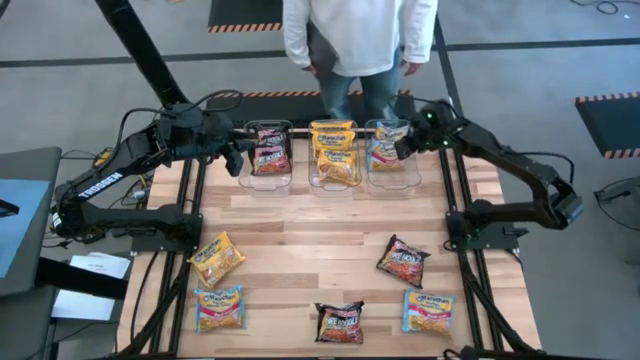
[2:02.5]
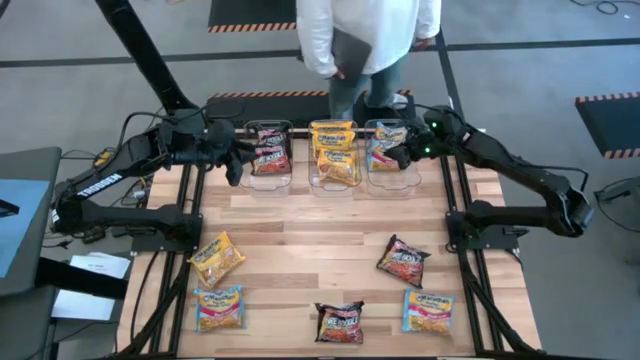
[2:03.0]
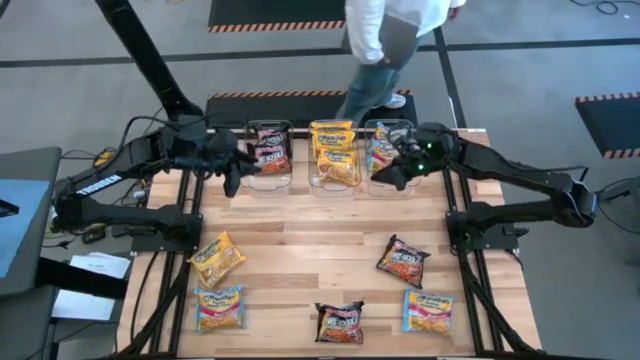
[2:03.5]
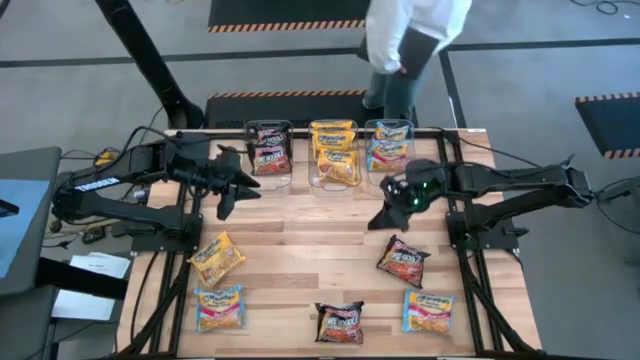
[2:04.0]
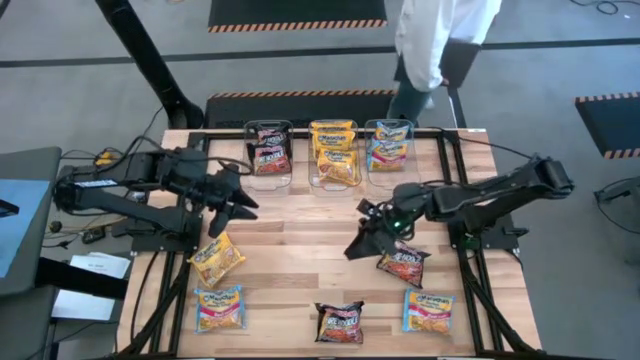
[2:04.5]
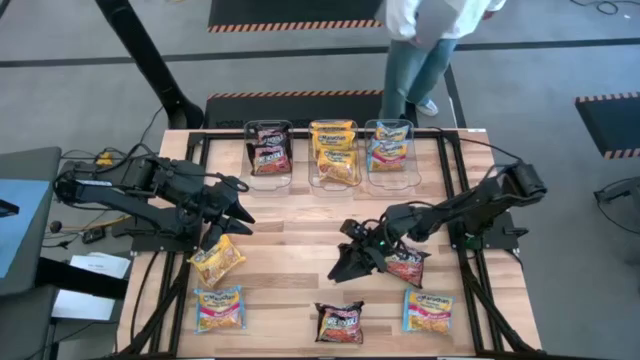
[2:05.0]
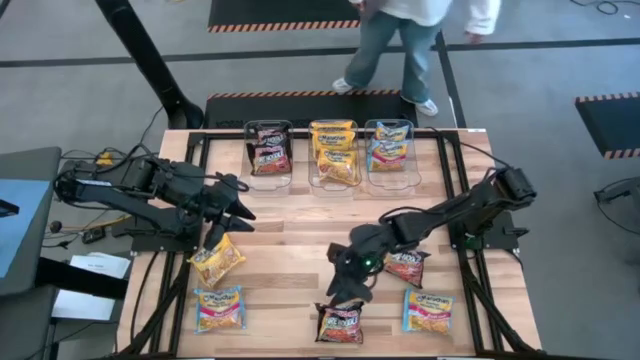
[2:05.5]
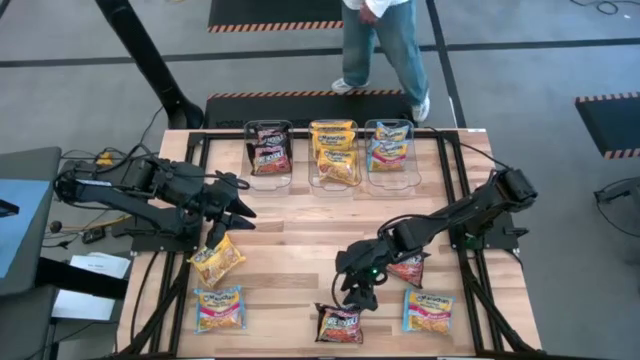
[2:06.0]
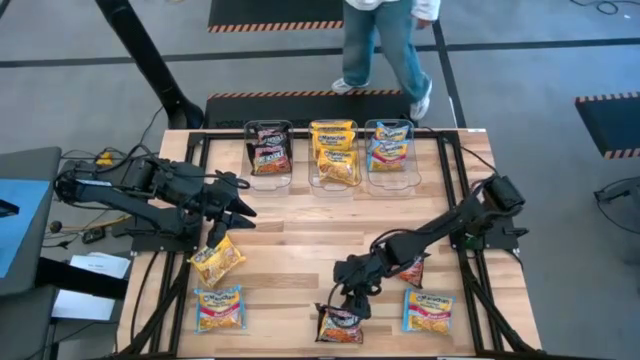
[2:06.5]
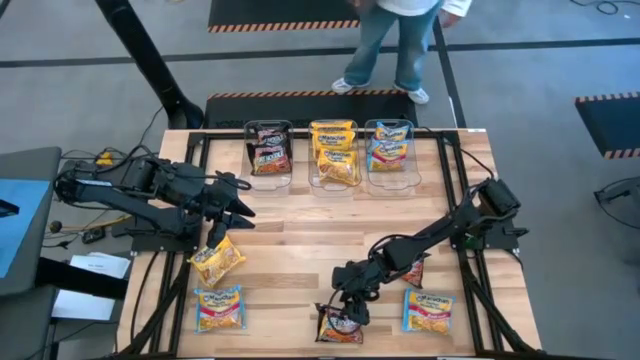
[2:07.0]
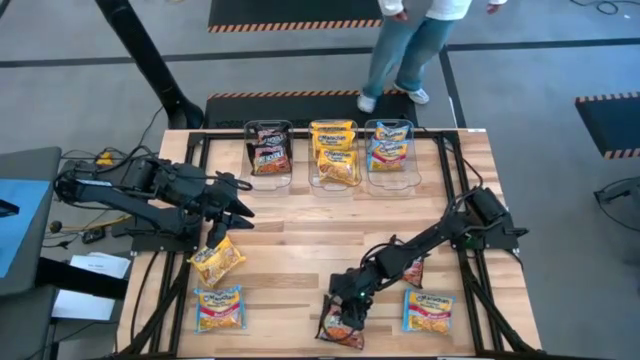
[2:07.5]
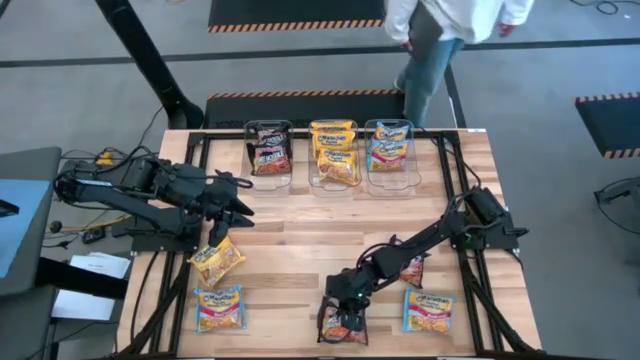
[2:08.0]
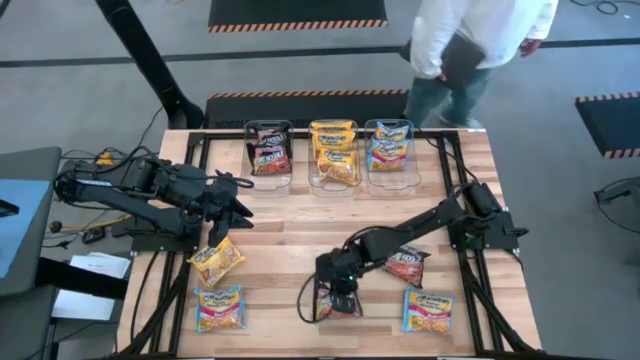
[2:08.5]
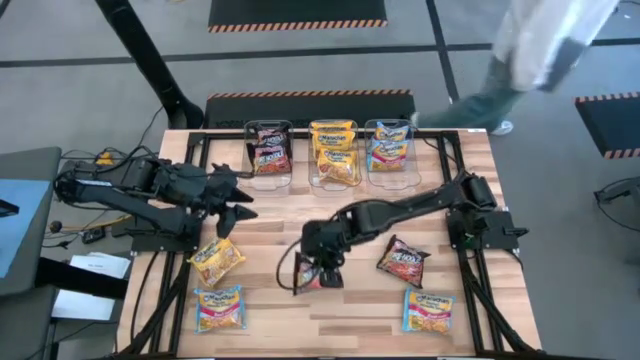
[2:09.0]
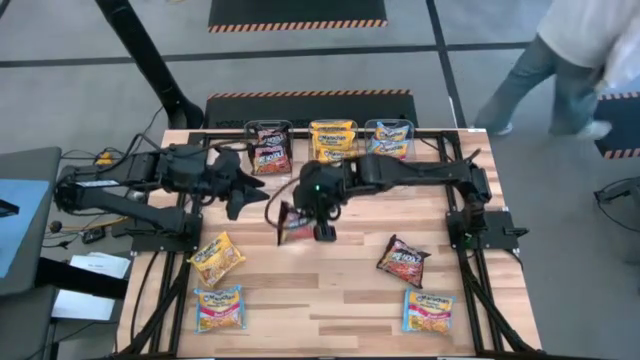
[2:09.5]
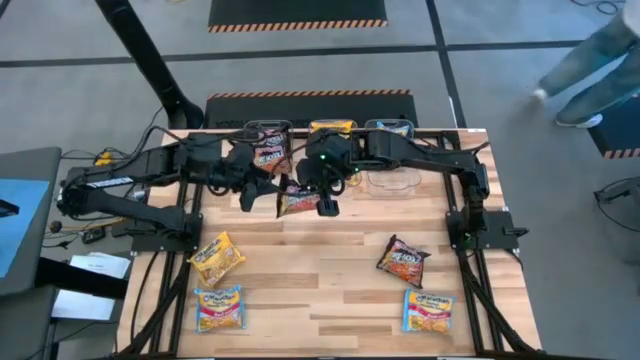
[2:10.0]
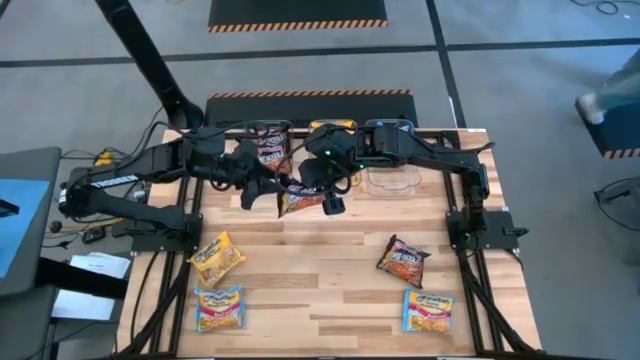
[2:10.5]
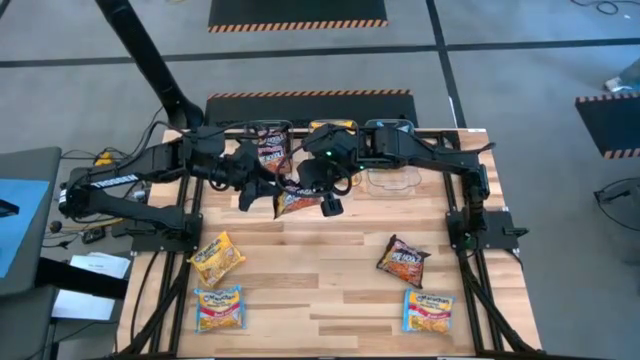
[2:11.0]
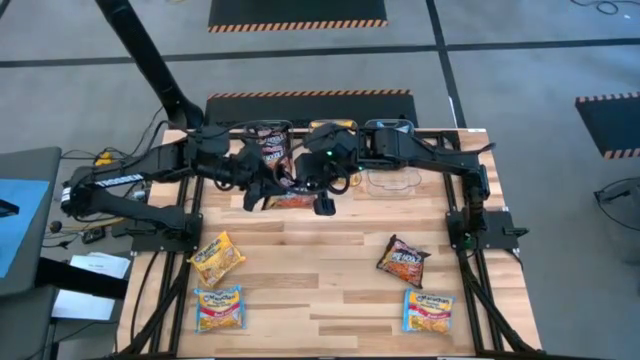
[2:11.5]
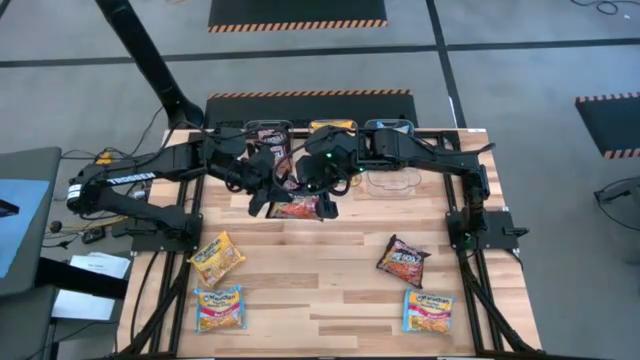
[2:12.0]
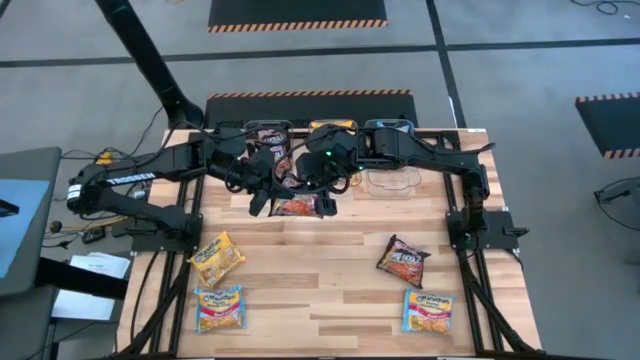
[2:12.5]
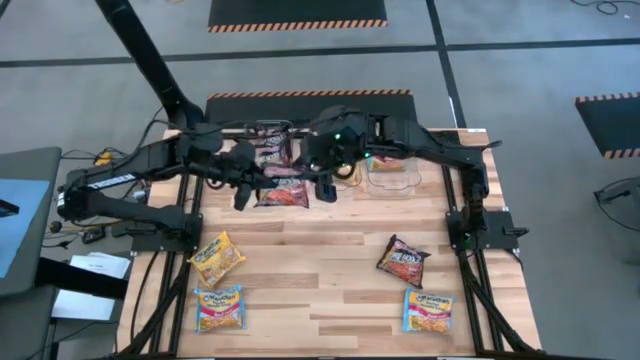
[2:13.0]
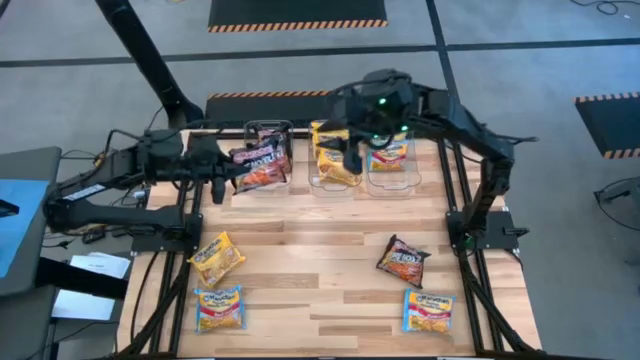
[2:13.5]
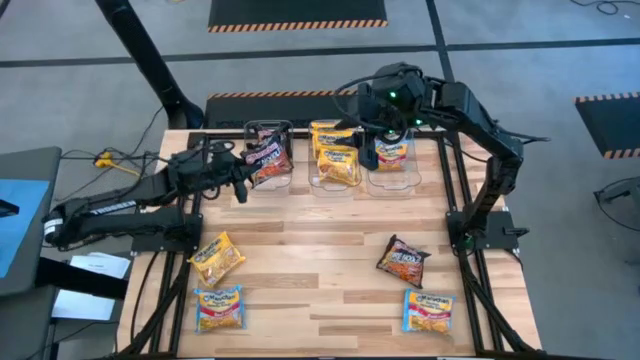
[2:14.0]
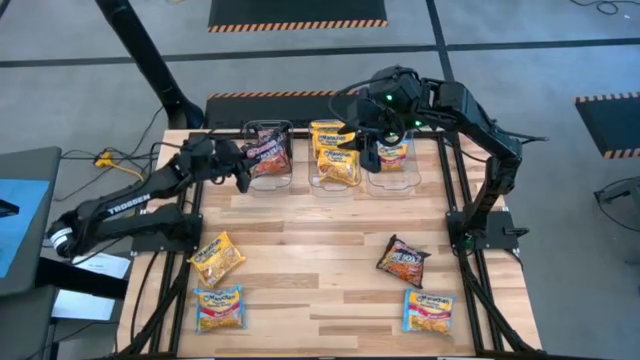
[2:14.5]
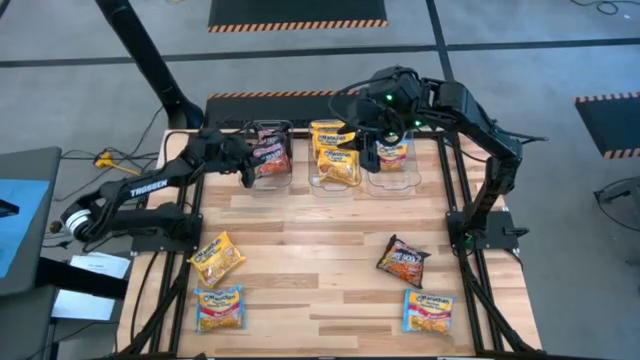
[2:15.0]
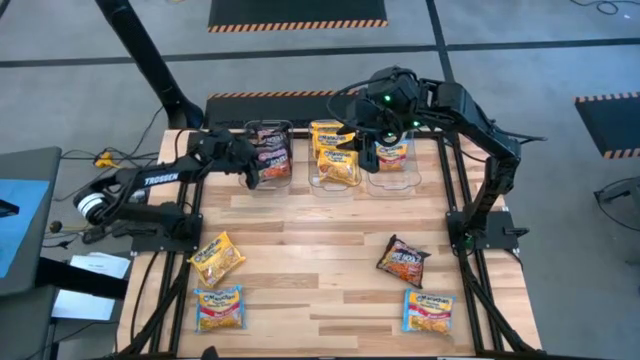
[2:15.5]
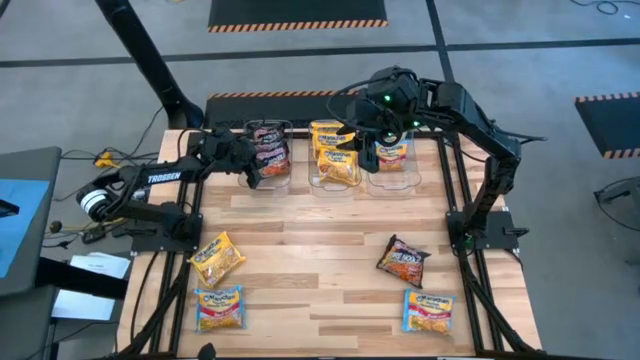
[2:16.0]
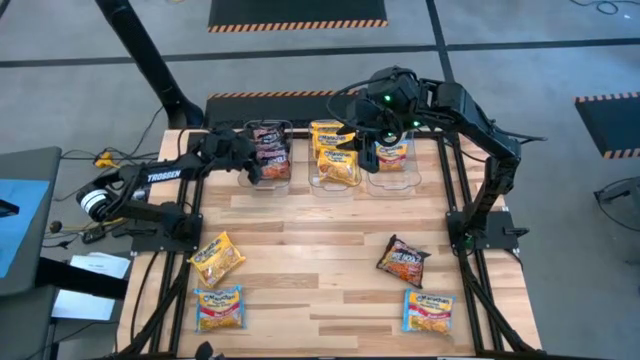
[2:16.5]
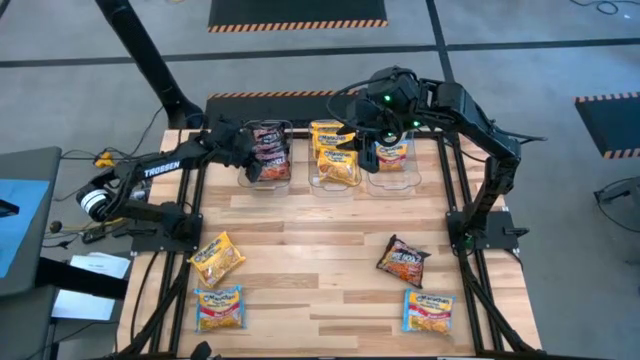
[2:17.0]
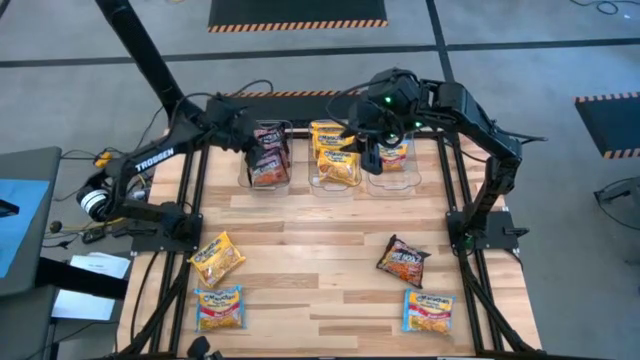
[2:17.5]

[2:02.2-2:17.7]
Task: Sort Maruchan noodles
Put the black noodle pack into the left transparent bin

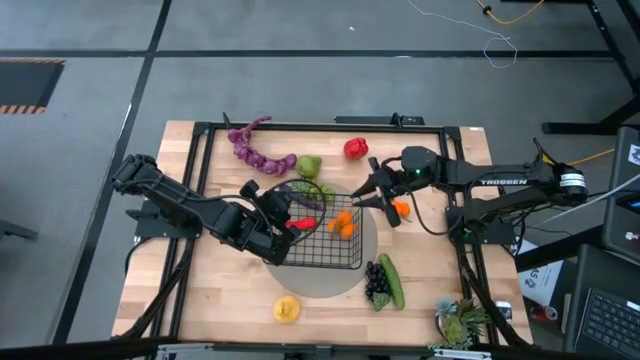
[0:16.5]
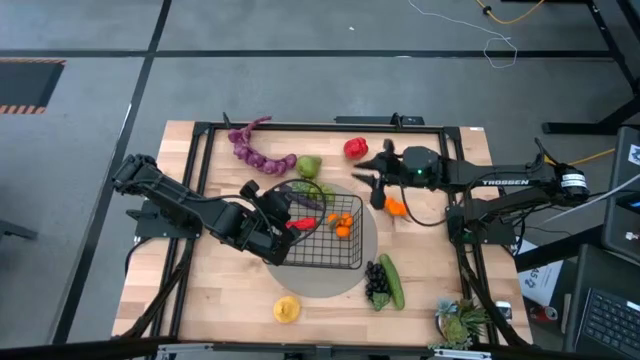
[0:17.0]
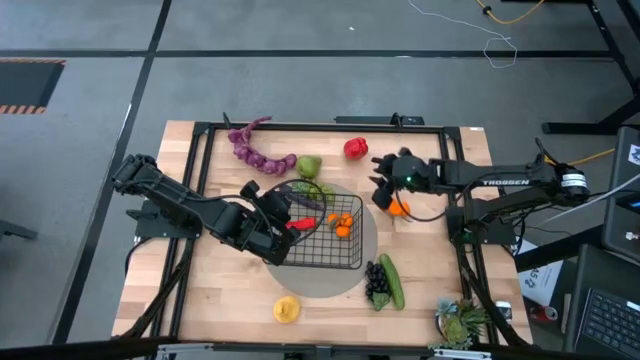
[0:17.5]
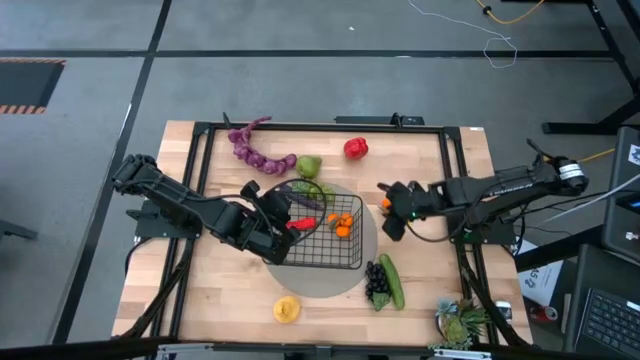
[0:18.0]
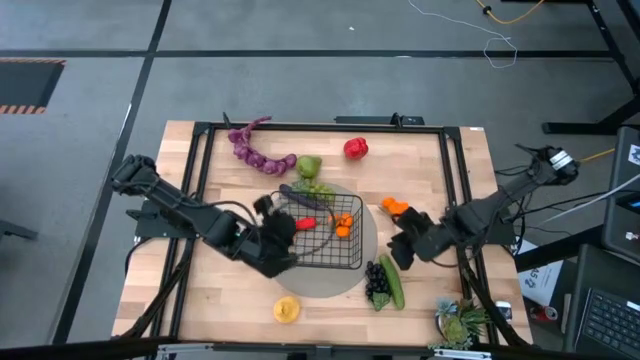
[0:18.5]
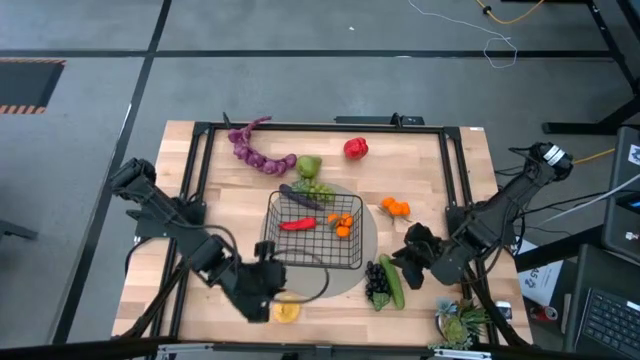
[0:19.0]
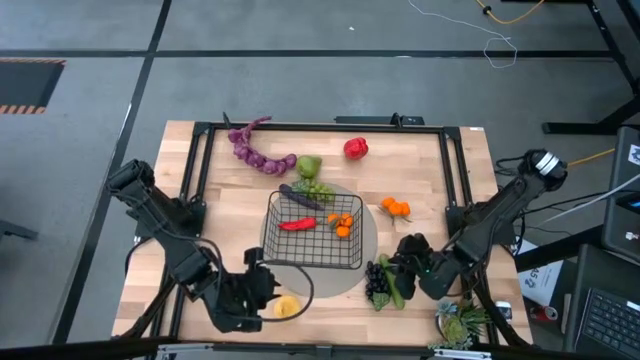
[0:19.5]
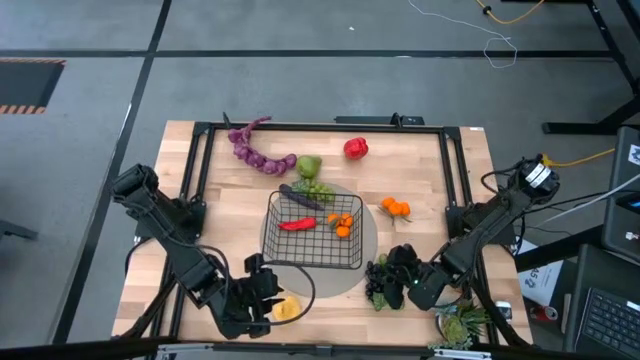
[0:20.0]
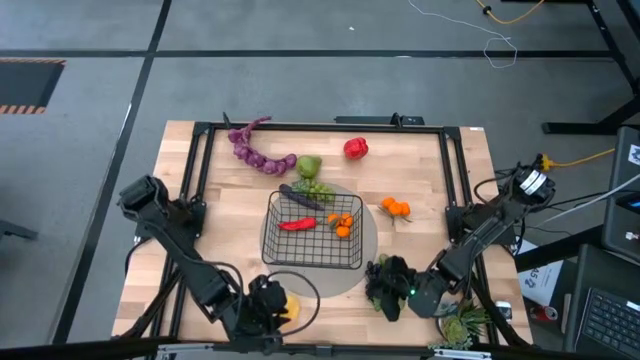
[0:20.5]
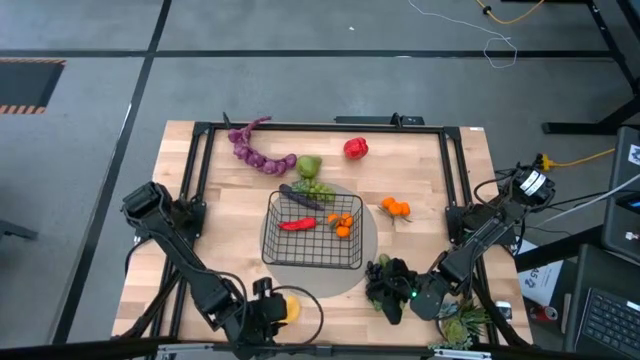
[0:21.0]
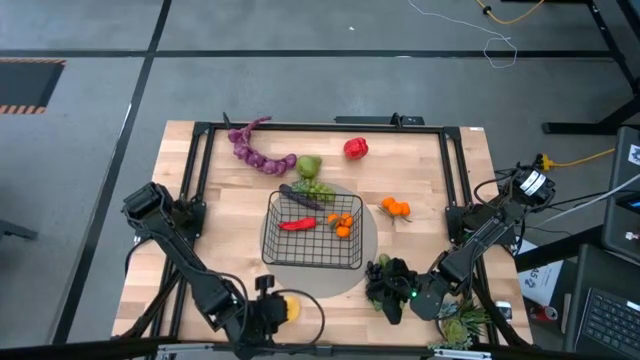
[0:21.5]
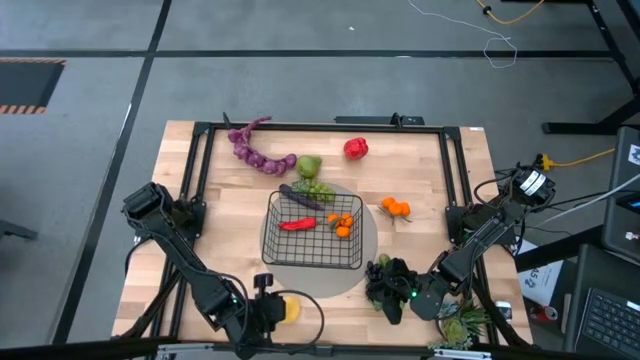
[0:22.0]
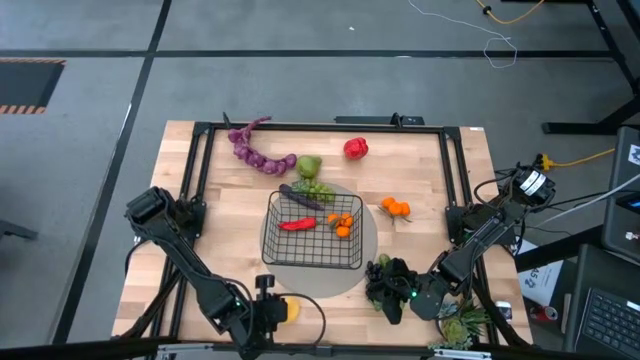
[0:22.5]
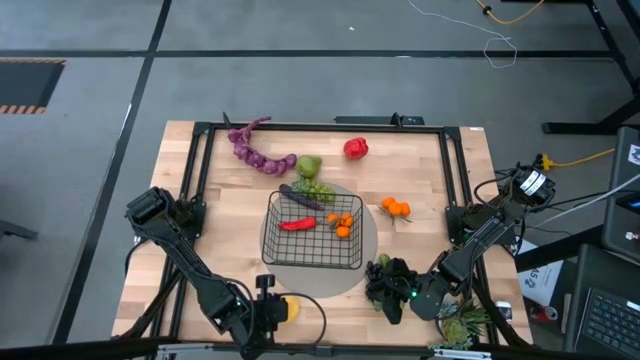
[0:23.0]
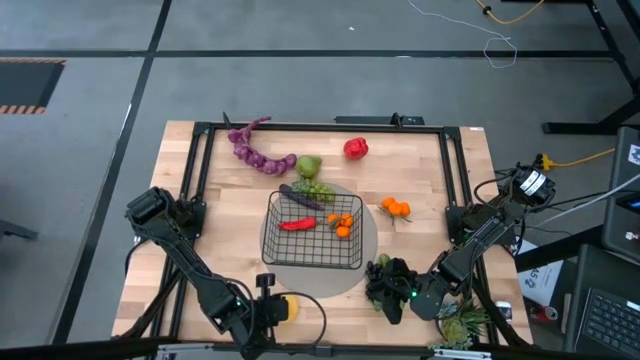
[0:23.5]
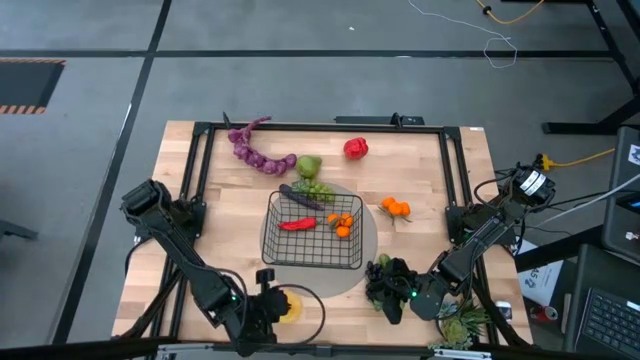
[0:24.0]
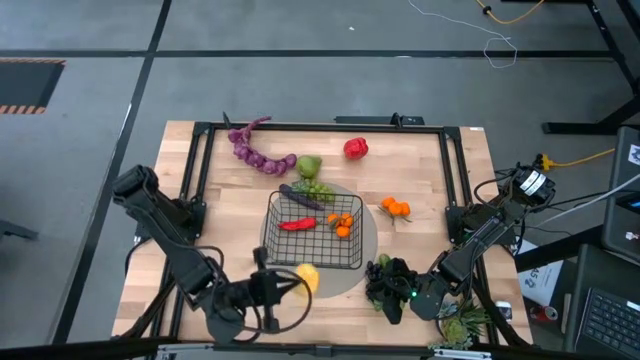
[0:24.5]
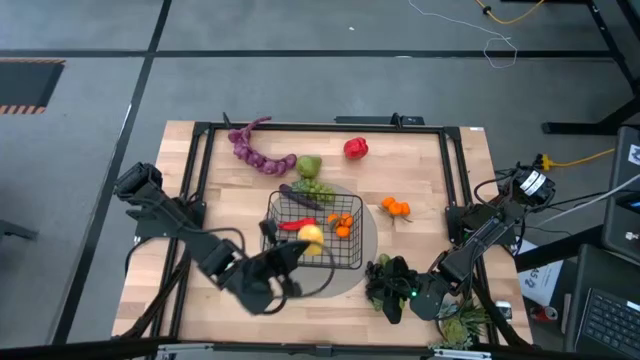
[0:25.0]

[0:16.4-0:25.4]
Task: Build produce basket
Put the yellow pear into the black wire basket
